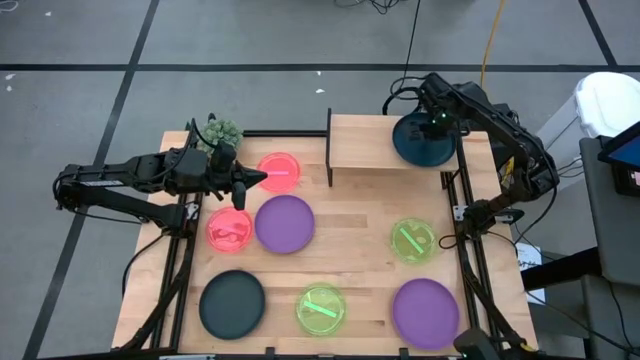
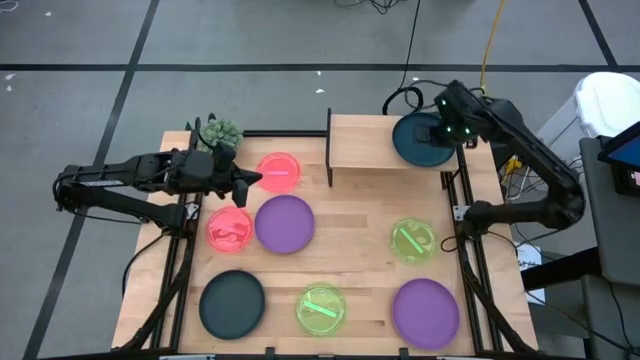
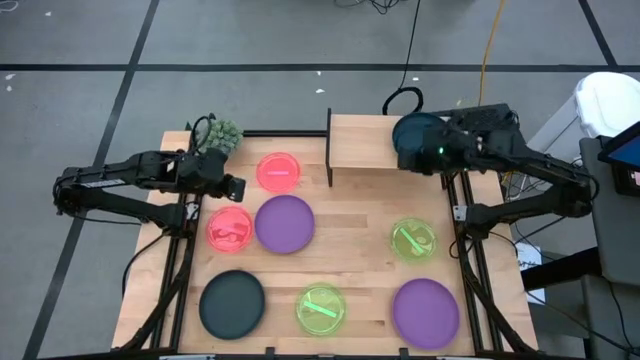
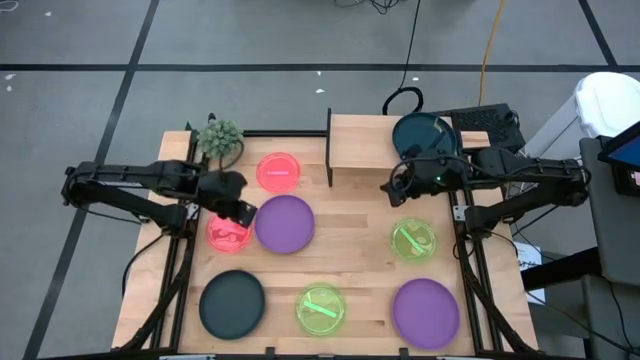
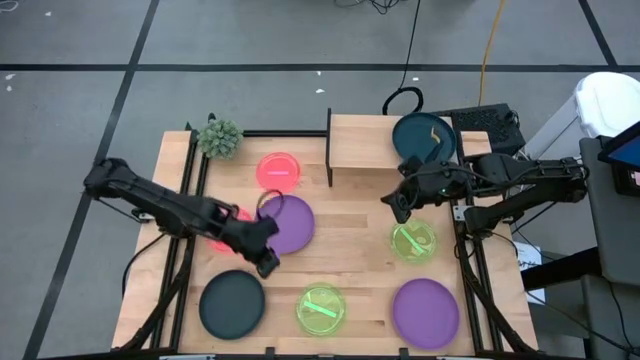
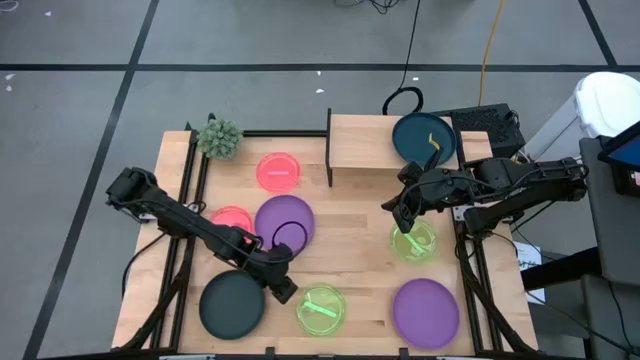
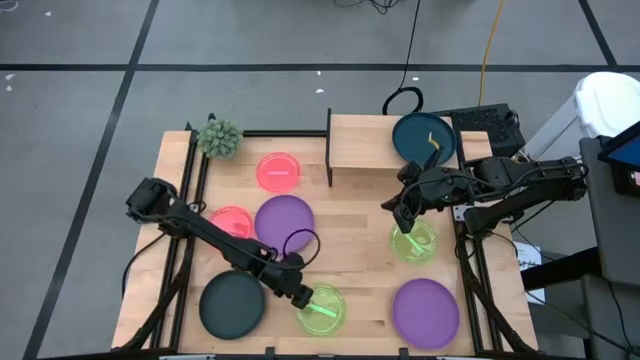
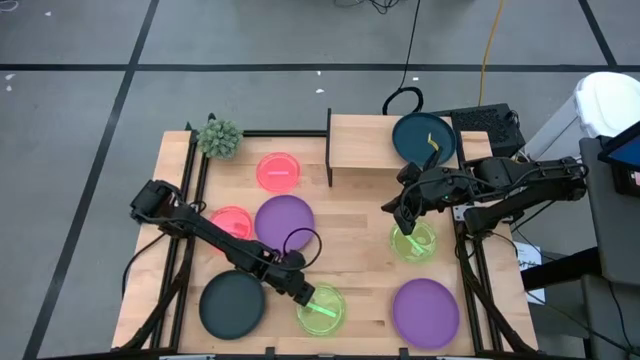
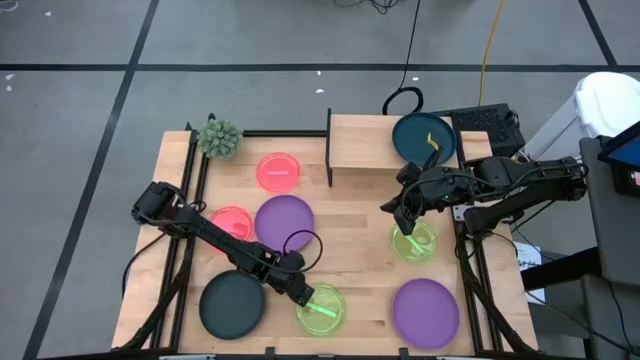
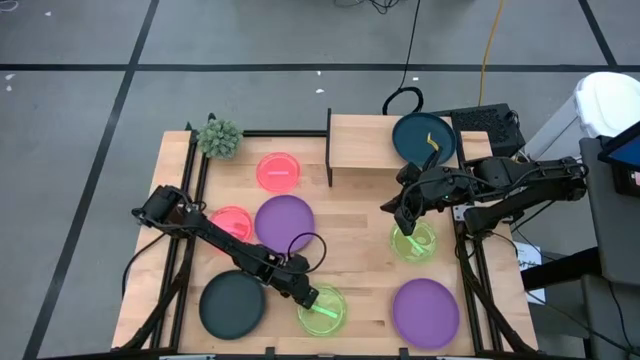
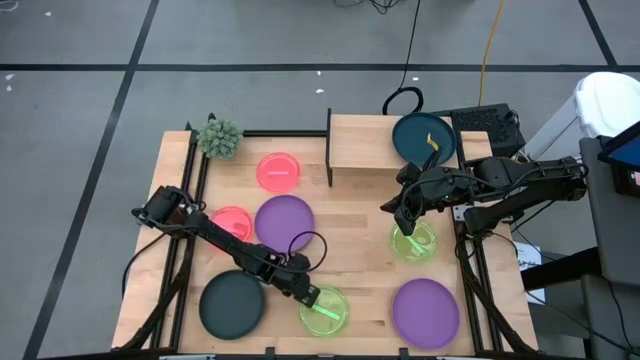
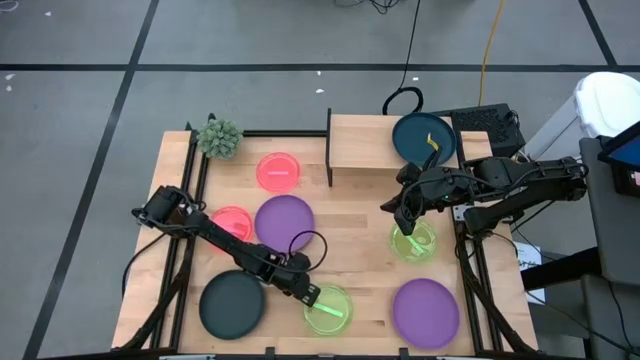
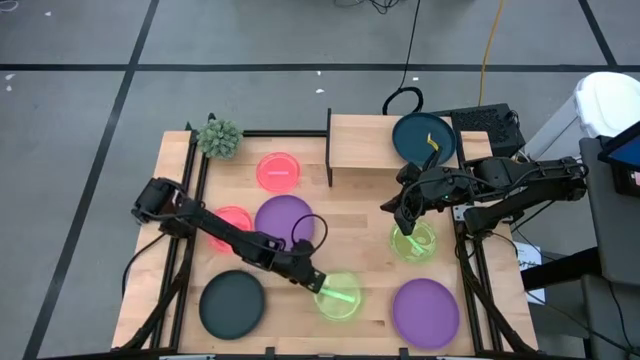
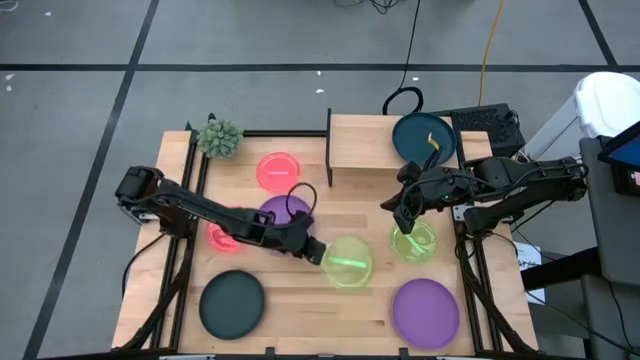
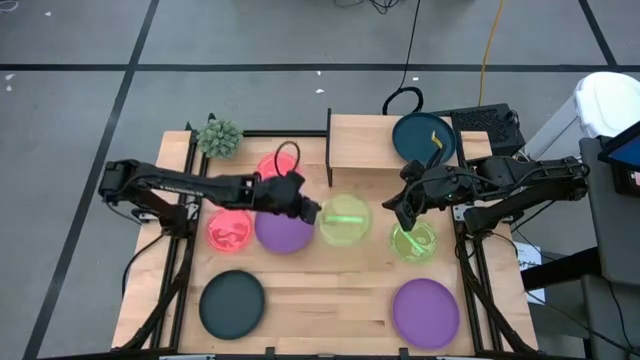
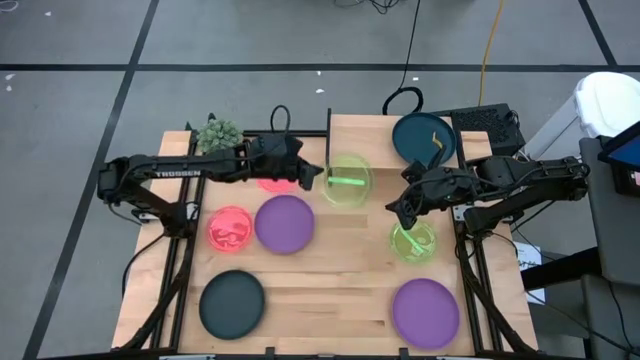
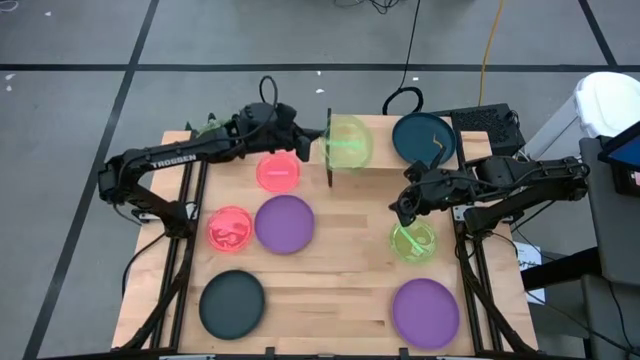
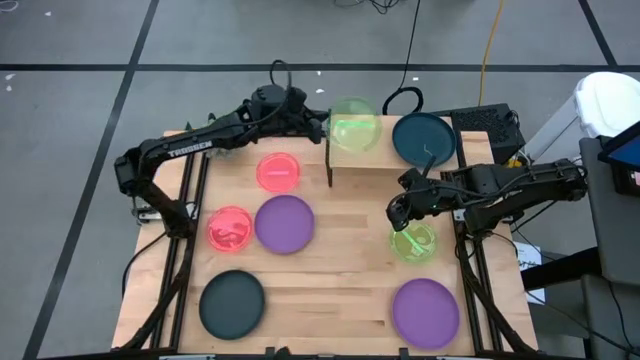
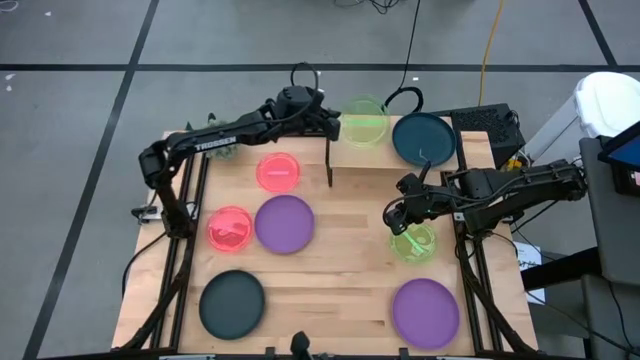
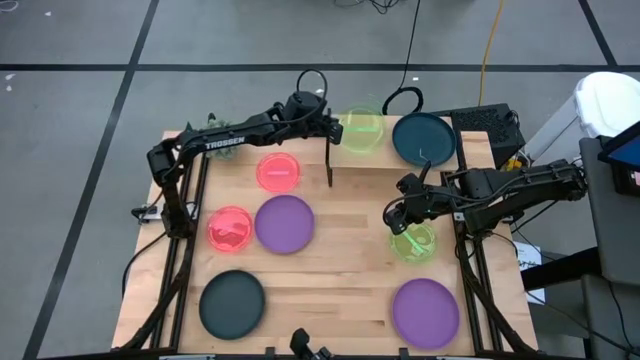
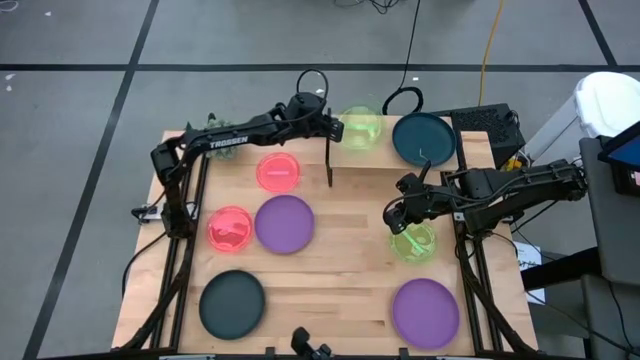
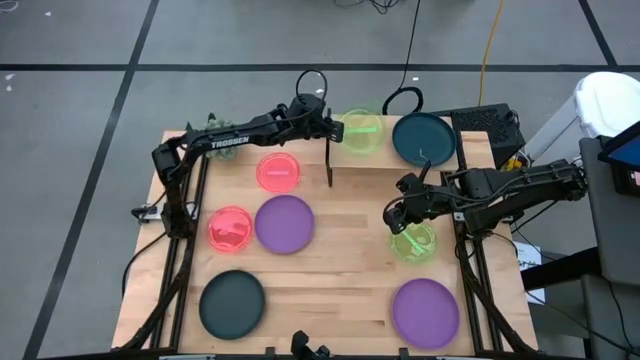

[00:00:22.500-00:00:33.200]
Task: Place and stack plates onto a shelf
Put the left green plate on the shelf

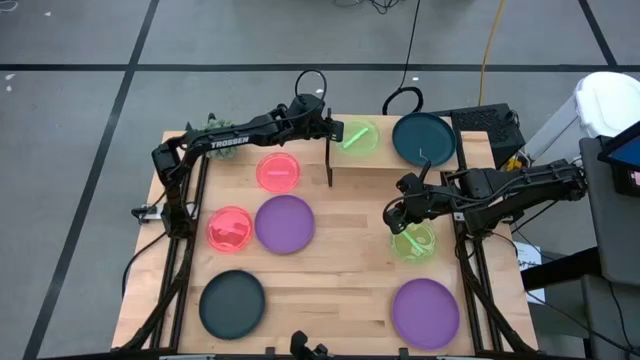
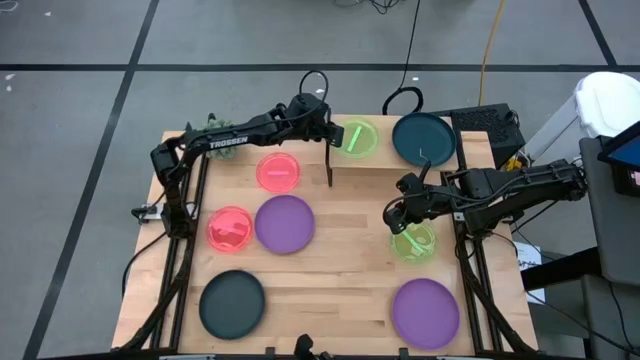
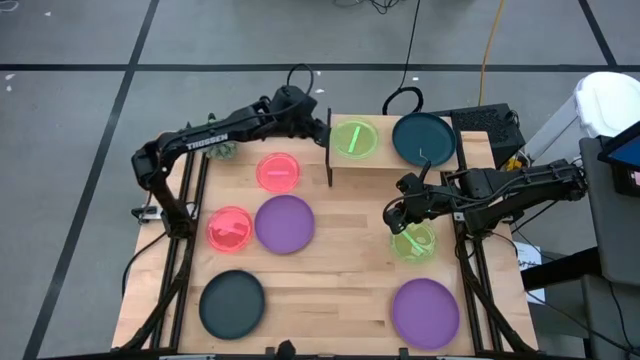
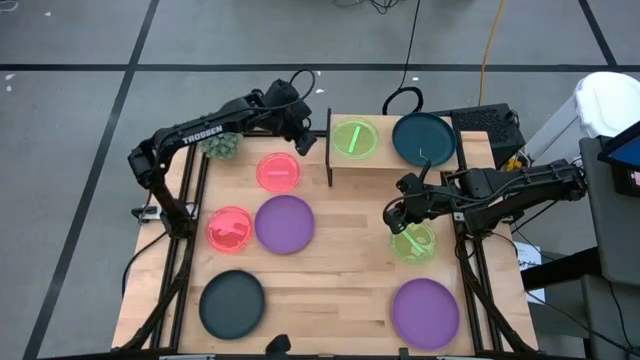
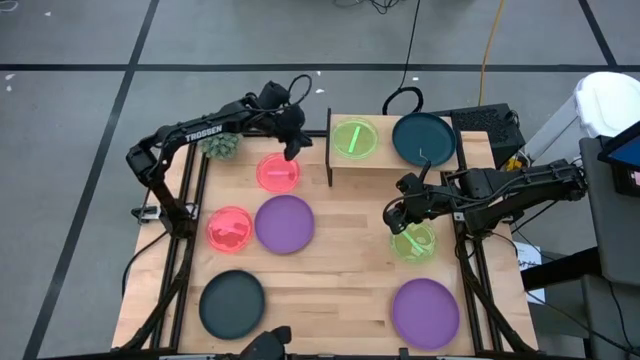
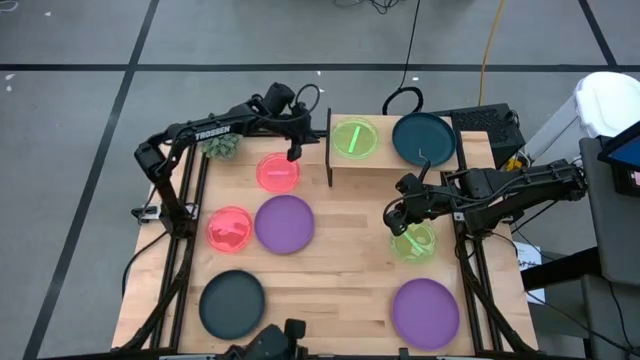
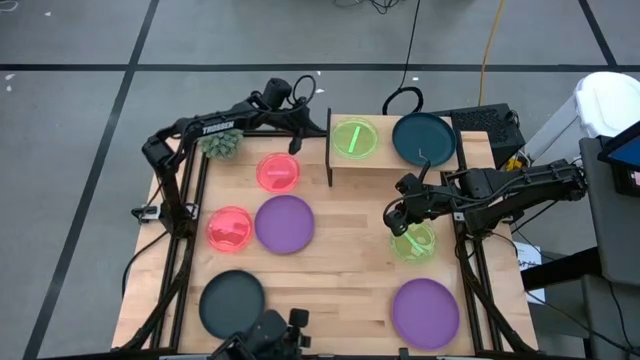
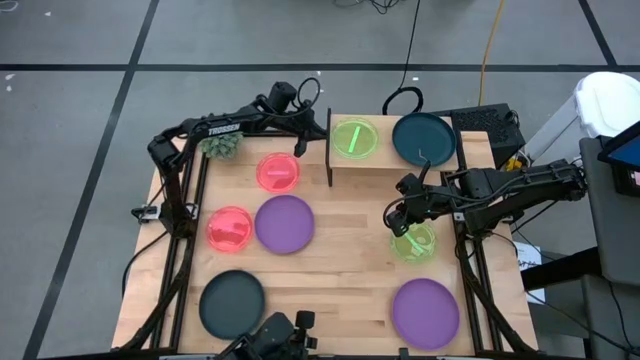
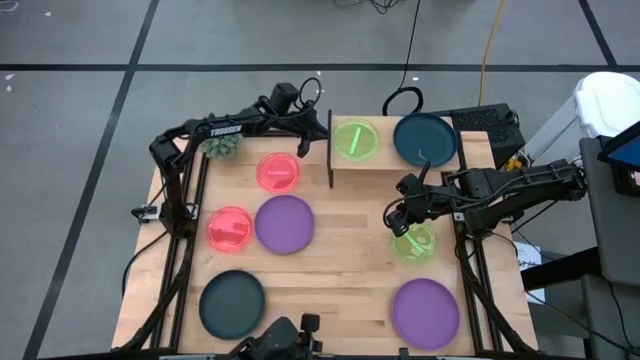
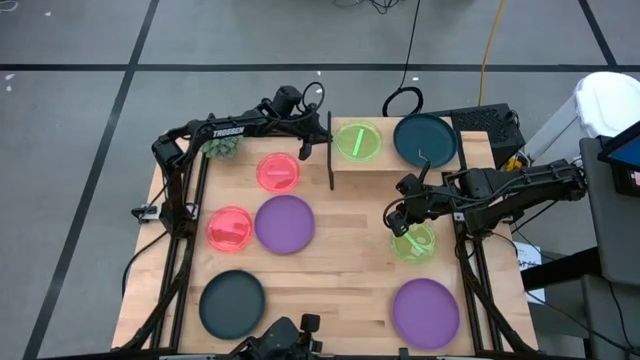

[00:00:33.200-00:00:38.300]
Adjust the shelf

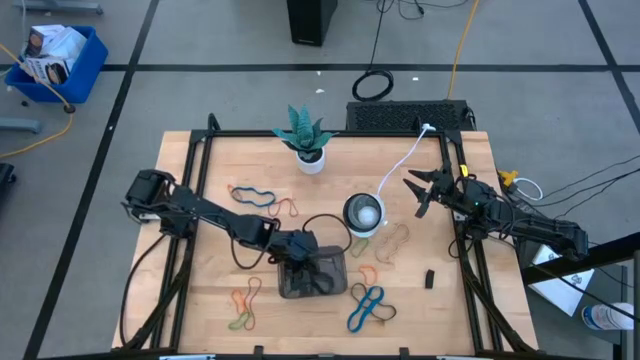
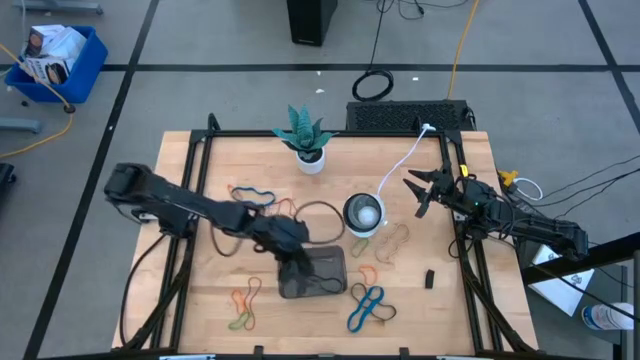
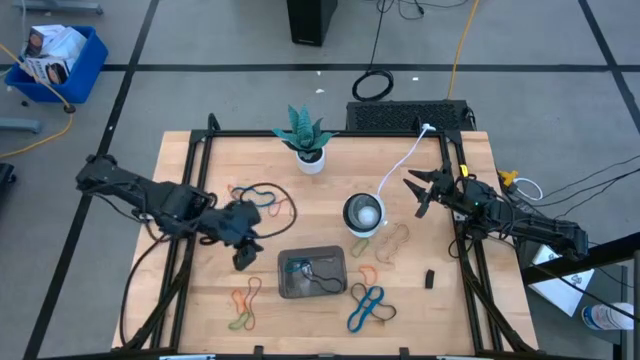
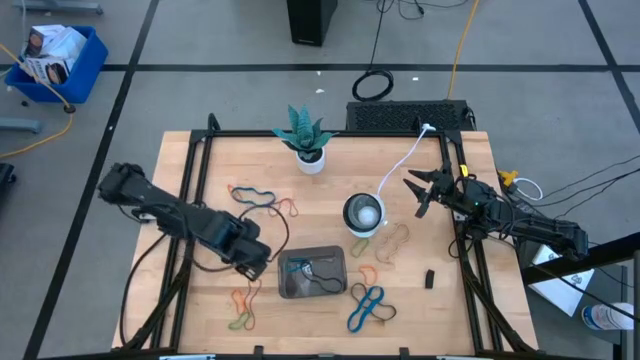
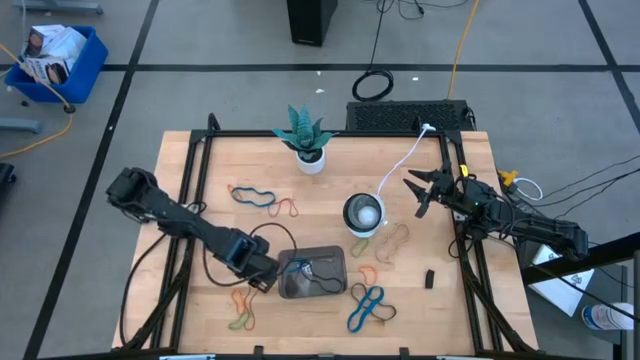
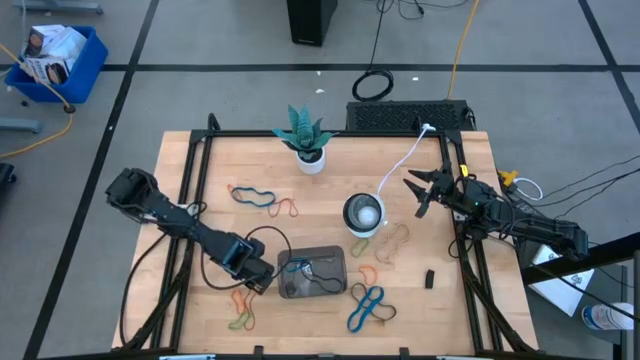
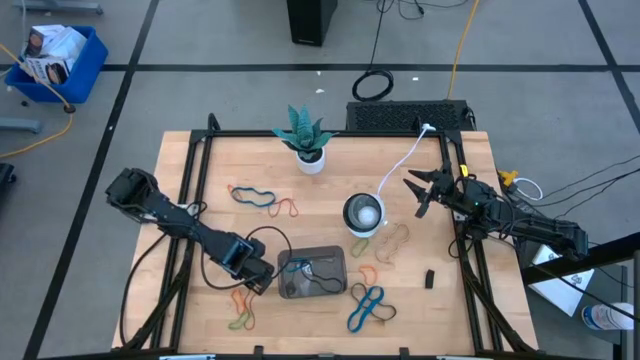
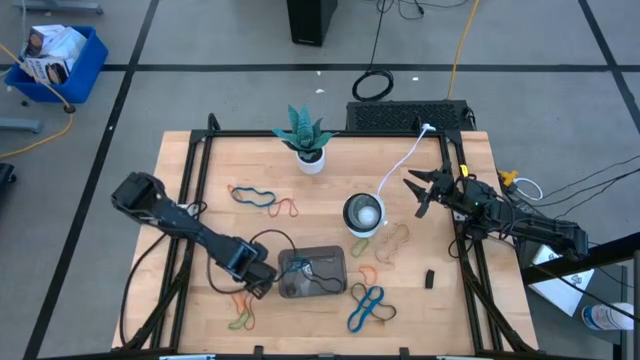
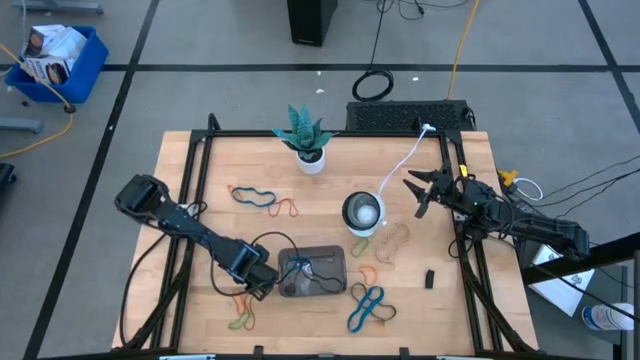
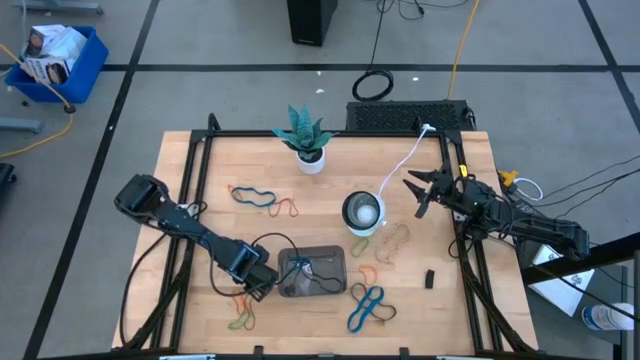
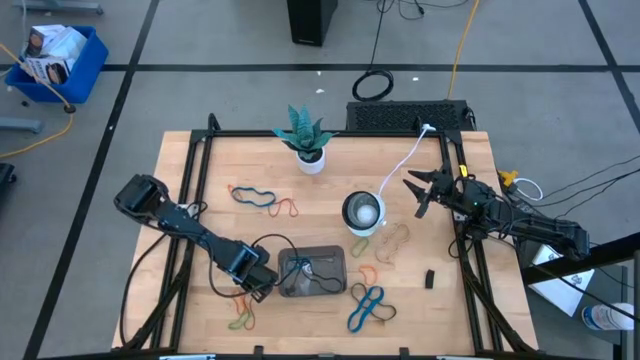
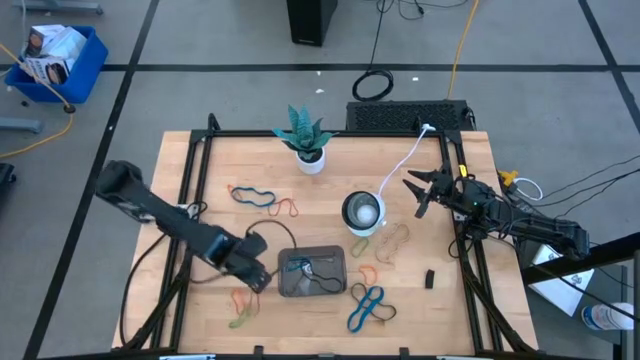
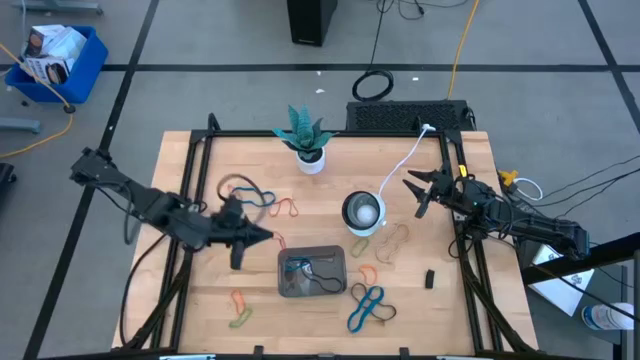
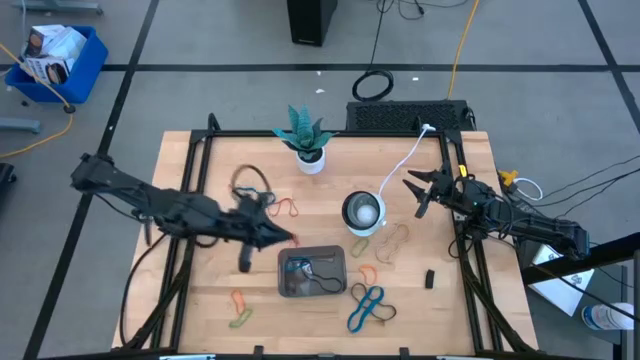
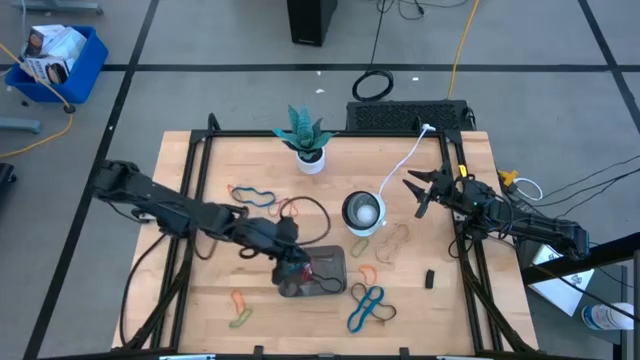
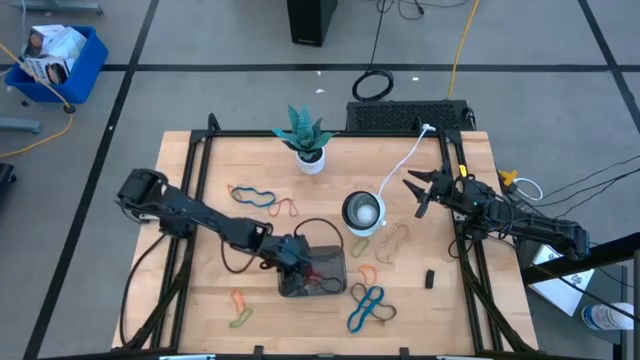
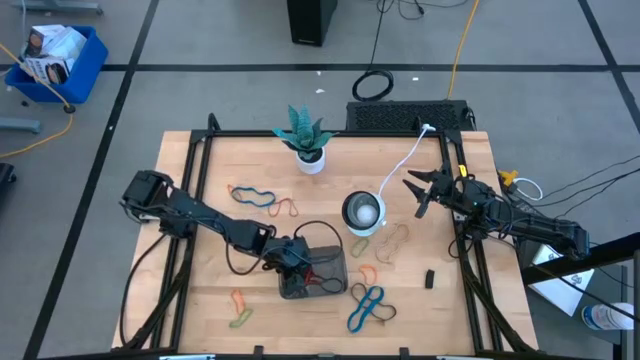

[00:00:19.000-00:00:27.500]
Task: Pick and place rubber bands into bin
Put the bottom red rubber band into the gray bin
